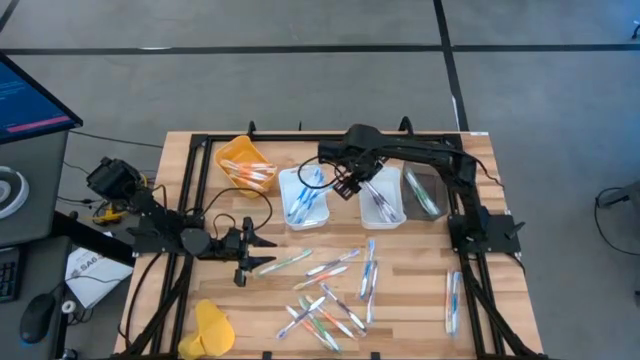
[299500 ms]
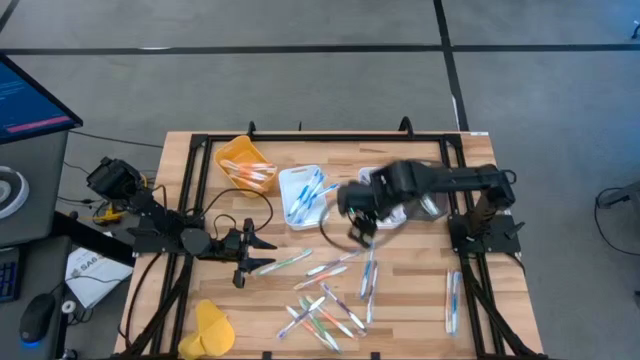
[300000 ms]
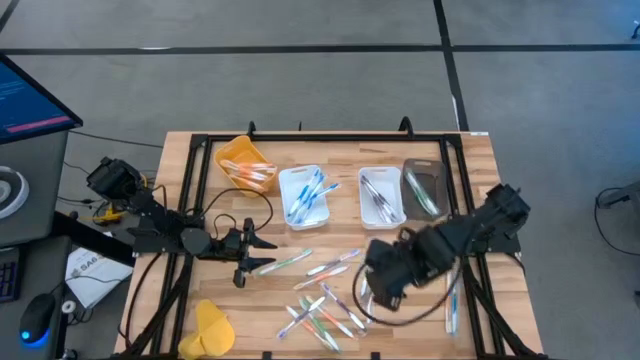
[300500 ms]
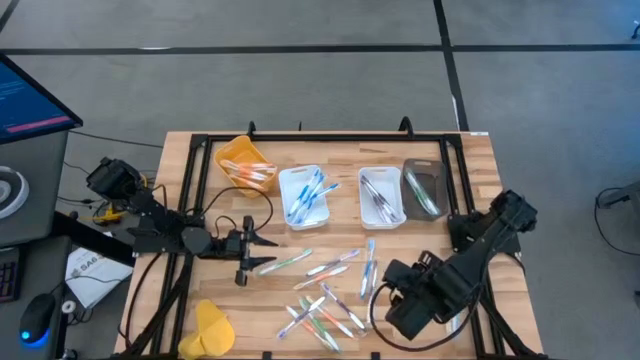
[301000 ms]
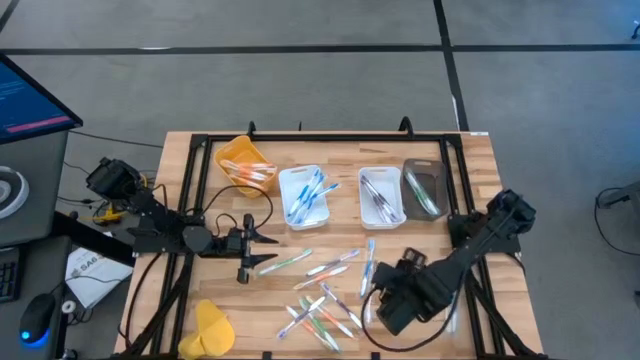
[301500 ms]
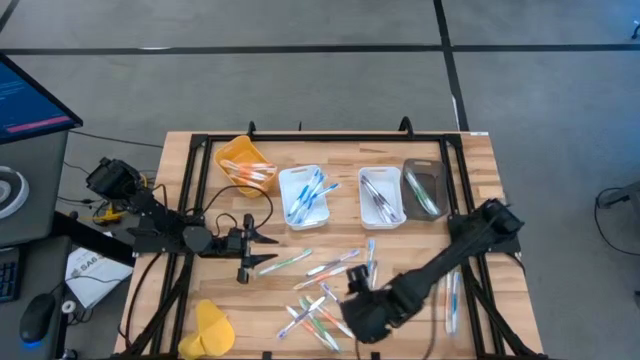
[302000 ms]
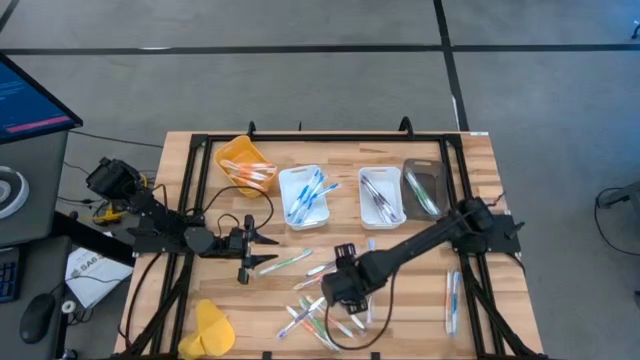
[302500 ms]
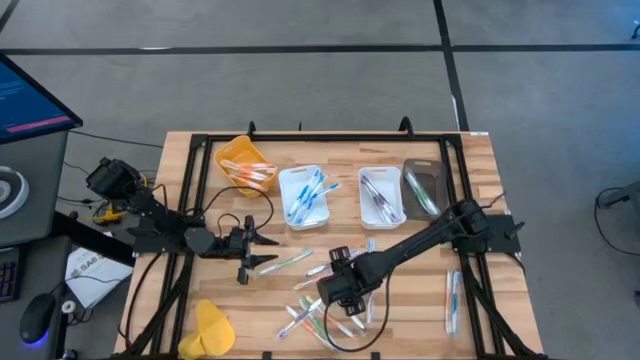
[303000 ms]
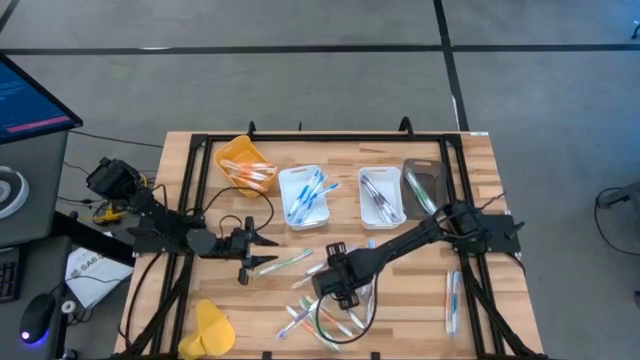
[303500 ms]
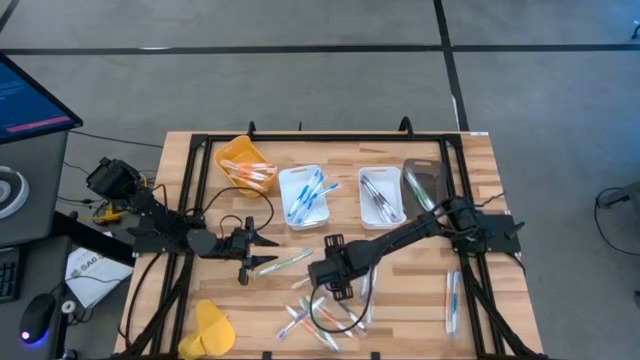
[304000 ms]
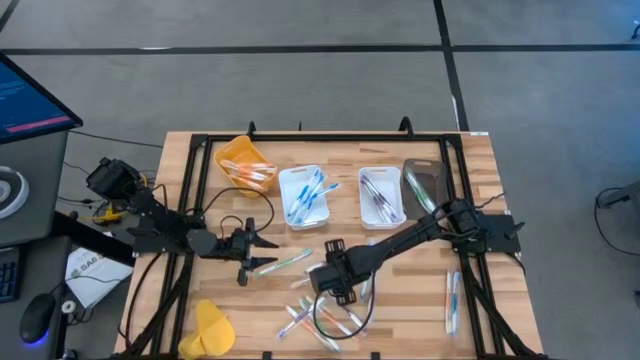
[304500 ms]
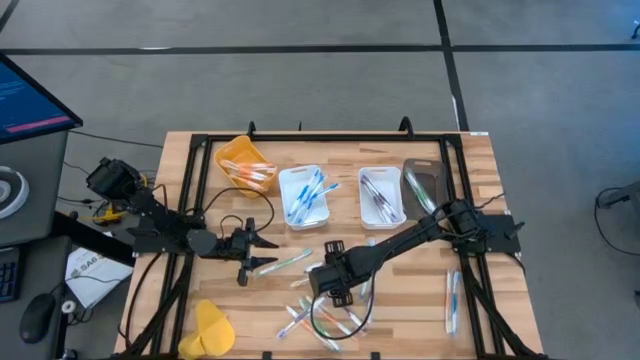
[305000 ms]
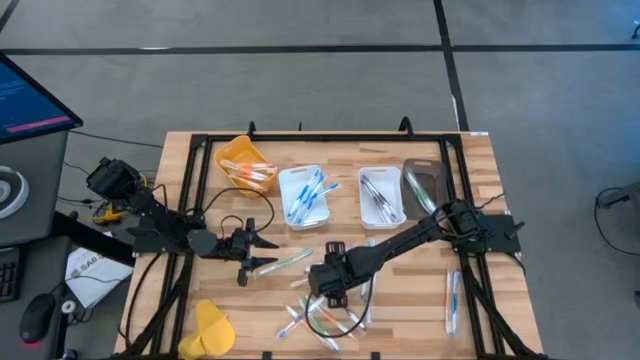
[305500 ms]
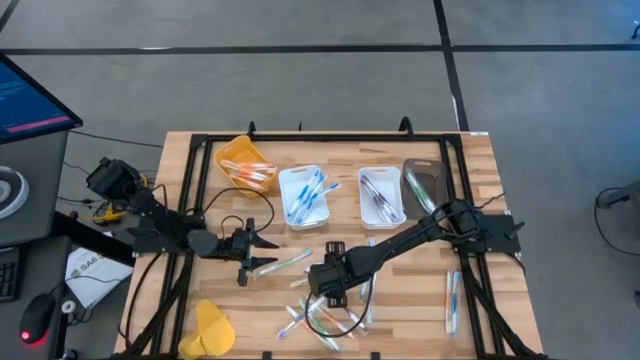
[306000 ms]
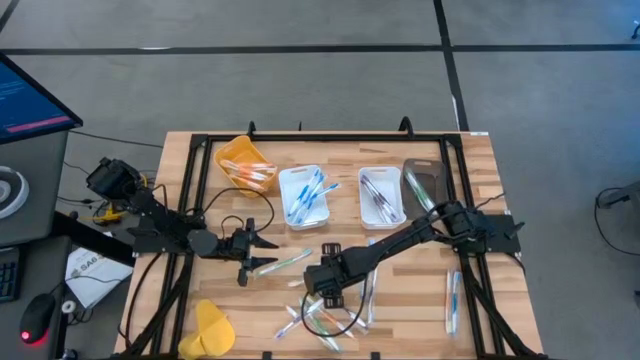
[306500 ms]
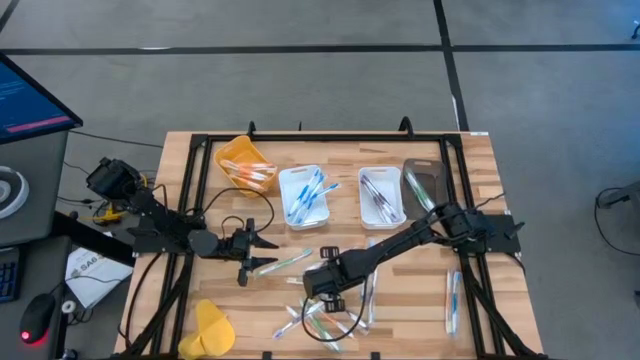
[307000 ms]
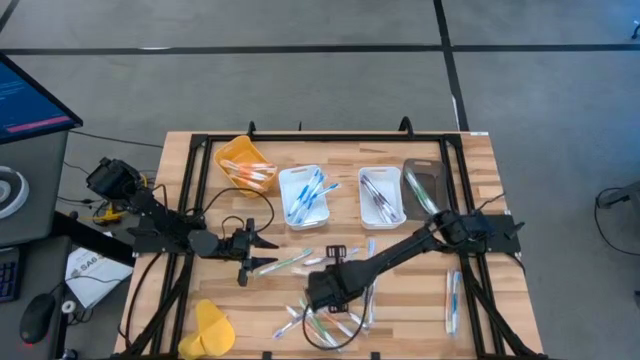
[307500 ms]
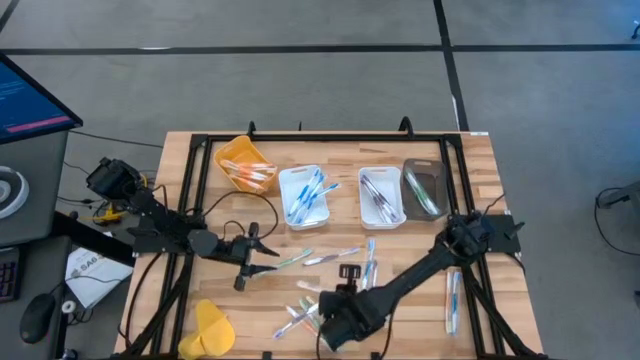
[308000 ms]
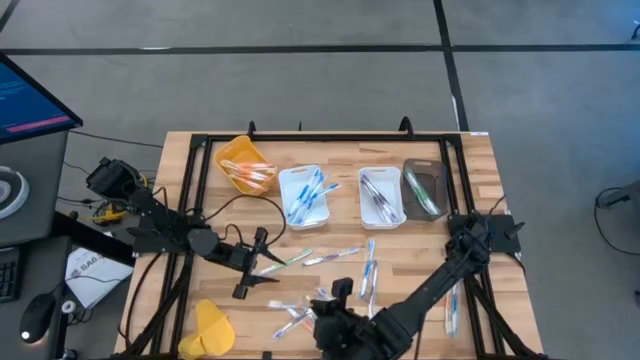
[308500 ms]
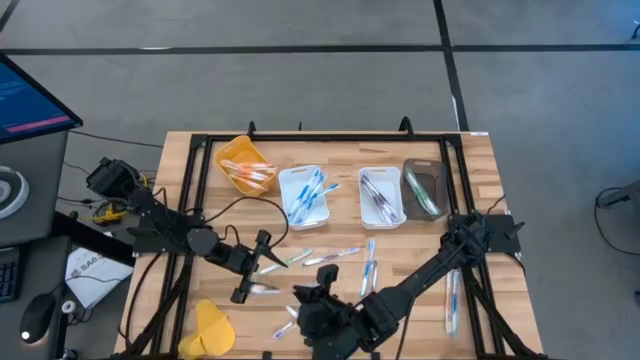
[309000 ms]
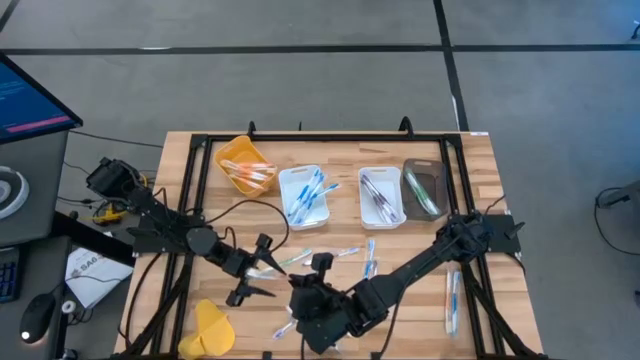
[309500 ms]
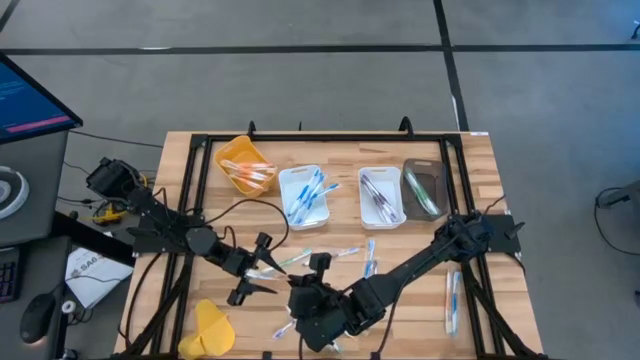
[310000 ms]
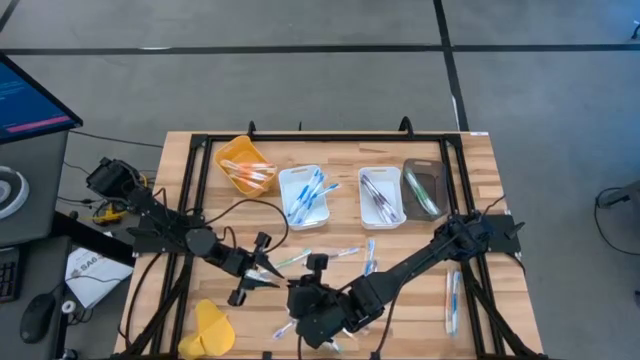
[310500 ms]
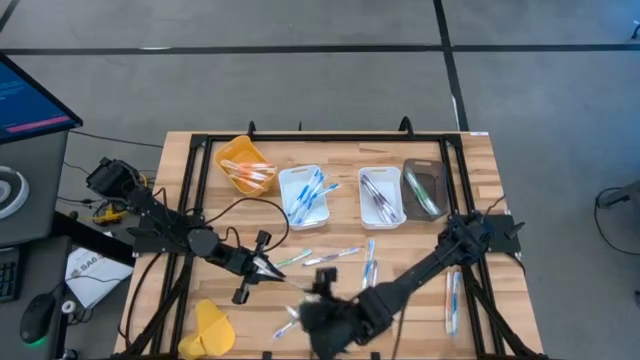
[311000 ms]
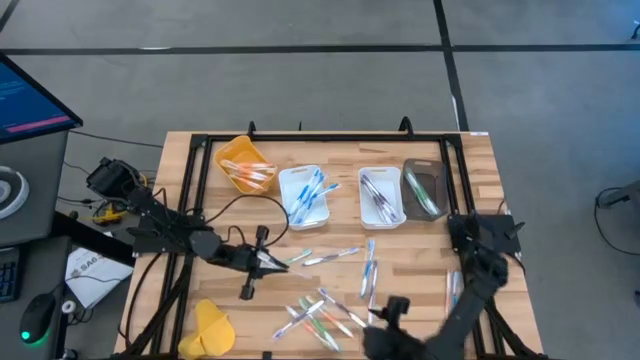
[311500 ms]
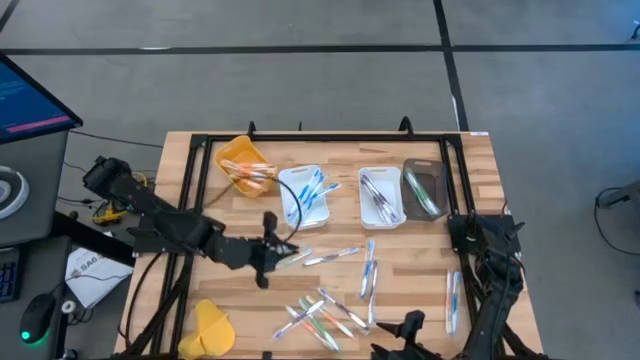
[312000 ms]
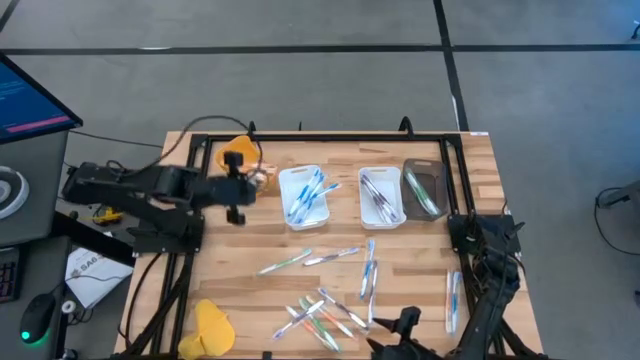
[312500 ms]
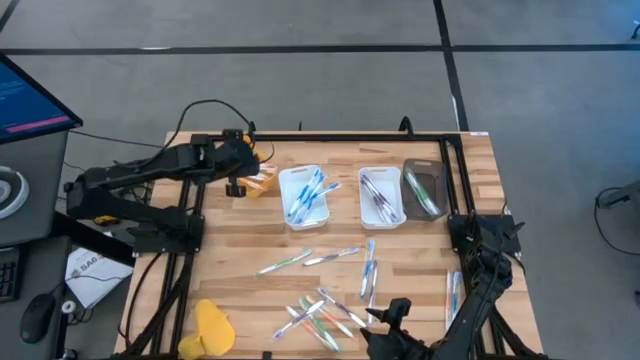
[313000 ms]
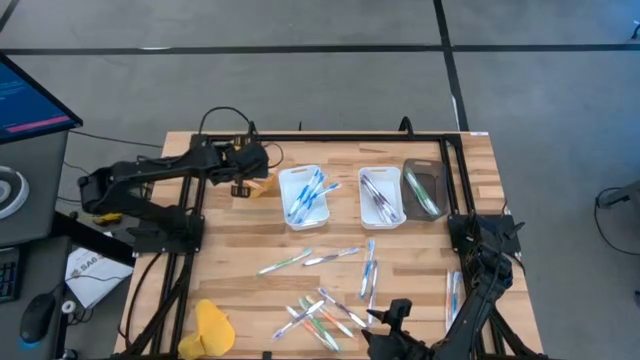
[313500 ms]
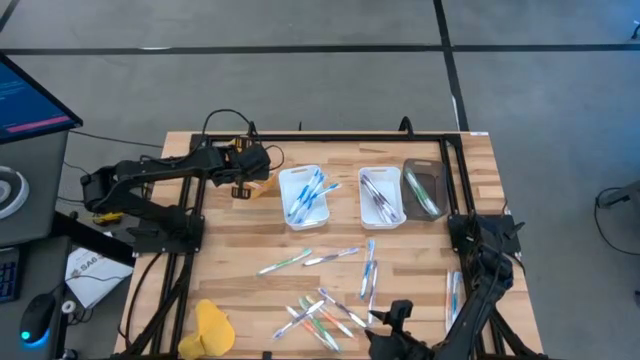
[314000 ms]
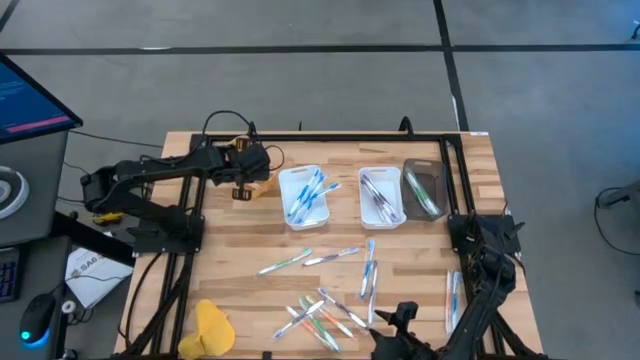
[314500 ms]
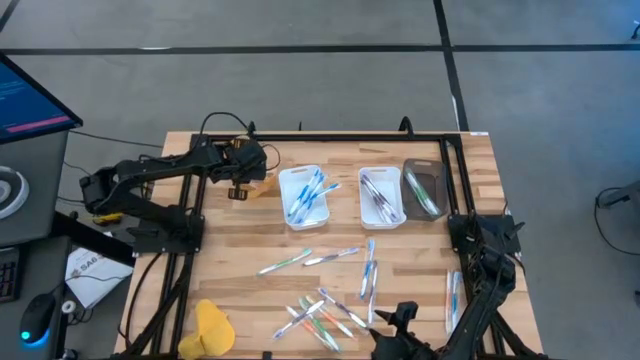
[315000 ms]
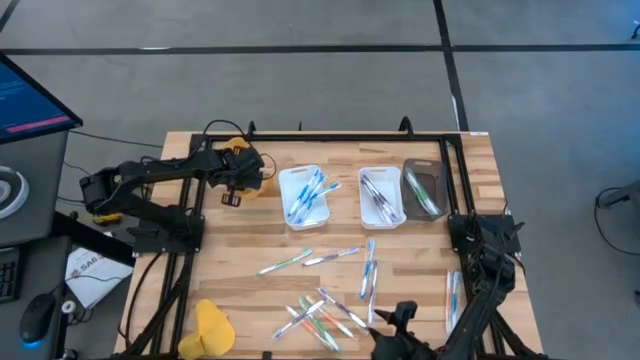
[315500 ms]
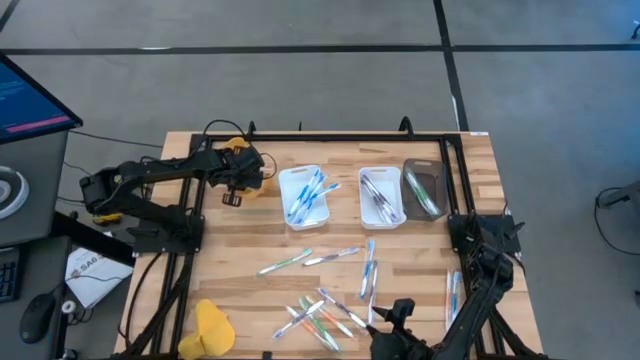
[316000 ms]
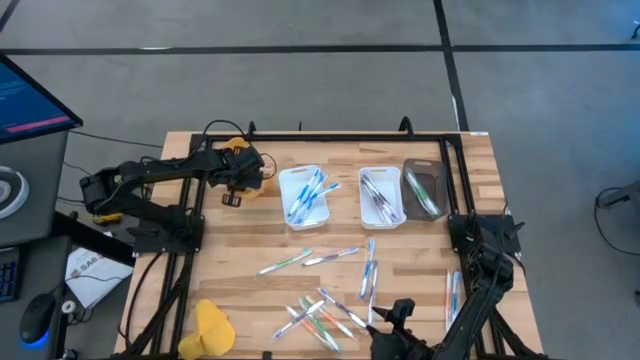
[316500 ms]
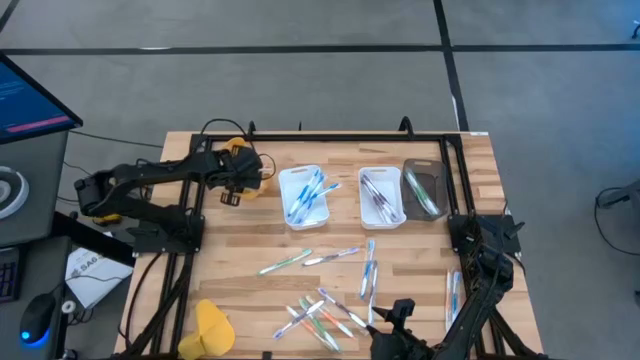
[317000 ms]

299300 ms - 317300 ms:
Task: Pick & Place Toothbrushes
Put the orange toothbrush into the orange bin

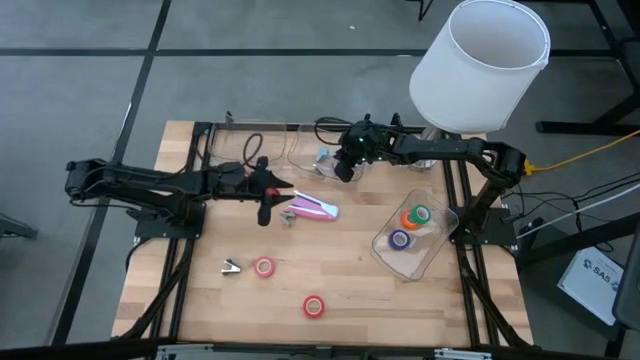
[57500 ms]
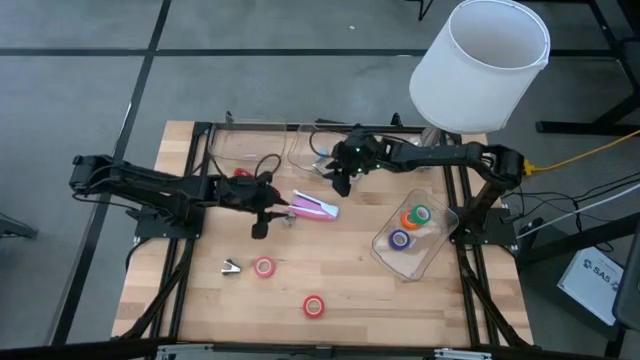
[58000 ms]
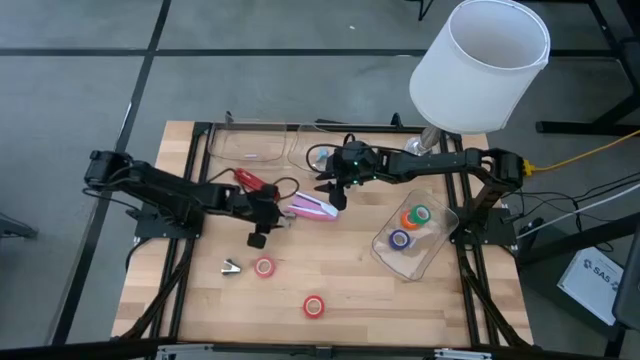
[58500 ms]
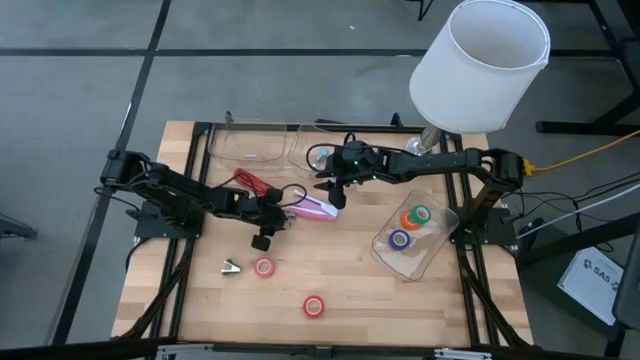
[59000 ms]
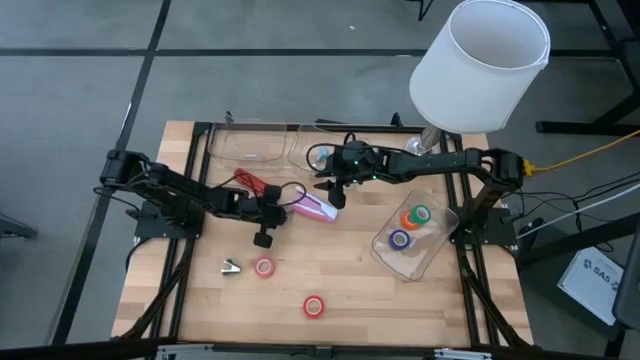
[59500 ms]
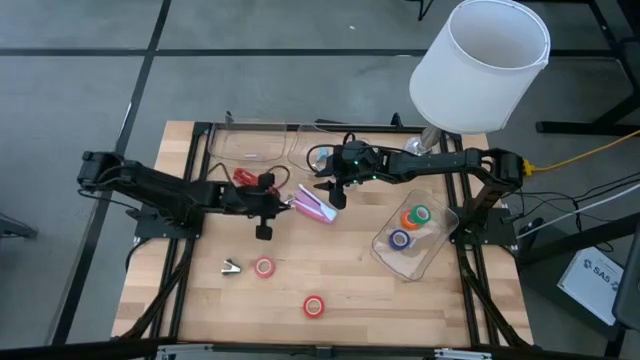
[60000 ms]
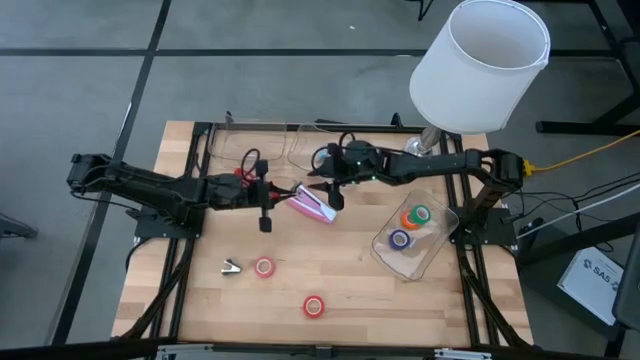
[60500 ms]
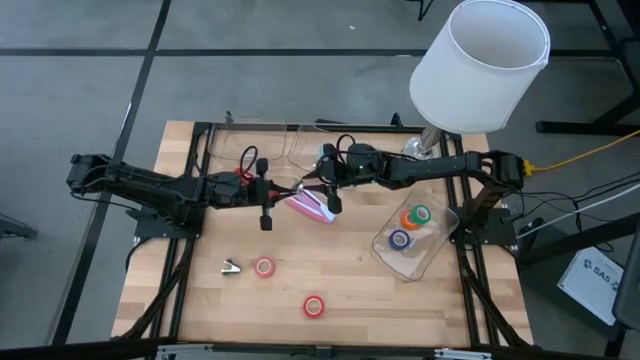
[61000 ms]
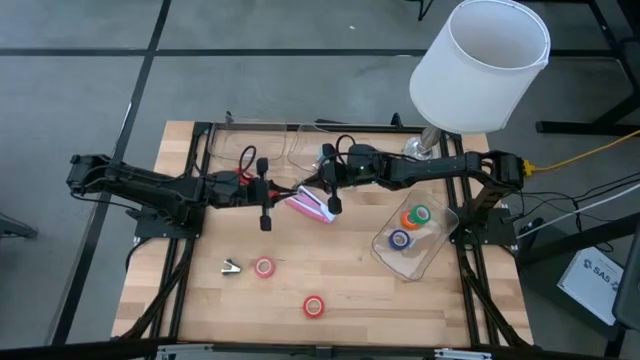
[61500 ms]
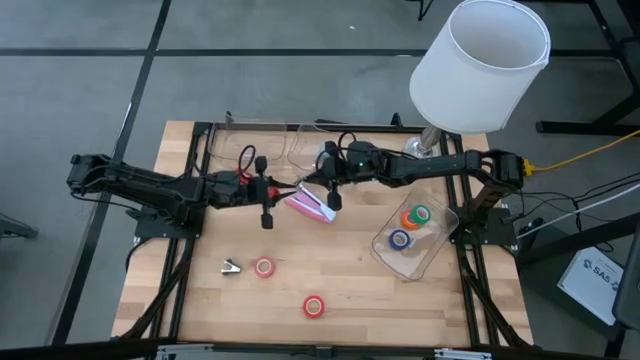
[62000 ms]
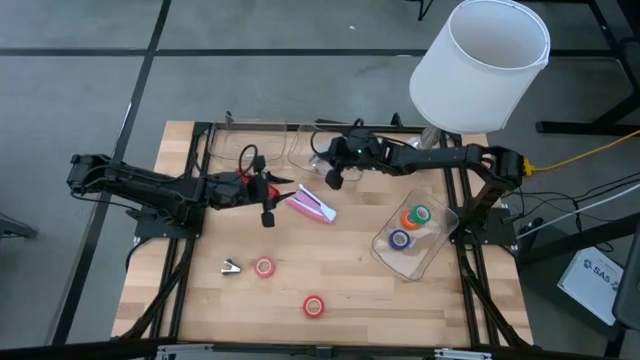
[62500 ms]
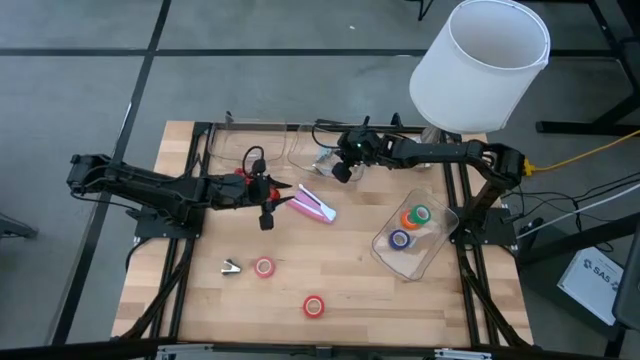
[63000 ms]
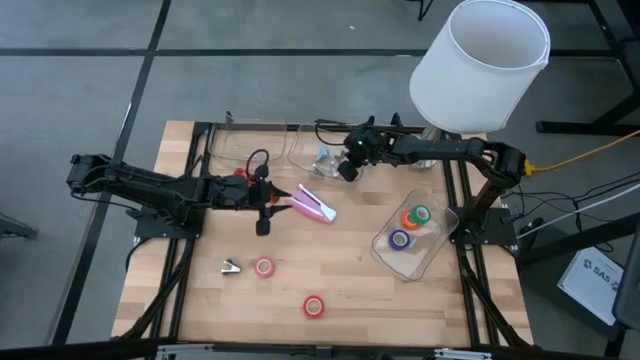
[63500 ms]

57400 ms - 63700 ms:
Task: Pick and place Stapler, Stapler remover, tape
Put the gray staple remover into the top right transparent bin
